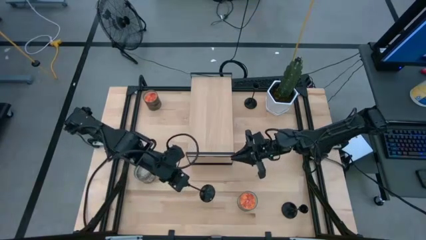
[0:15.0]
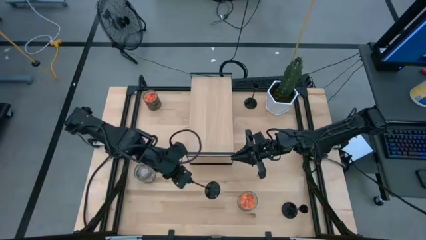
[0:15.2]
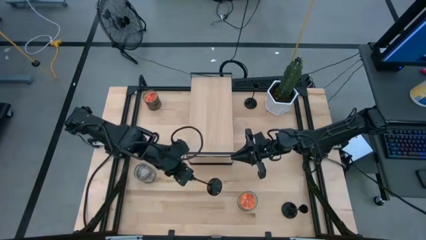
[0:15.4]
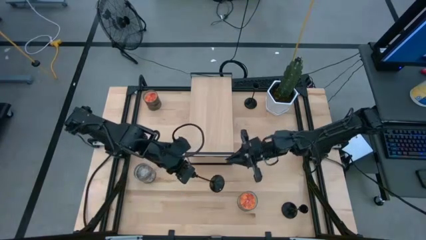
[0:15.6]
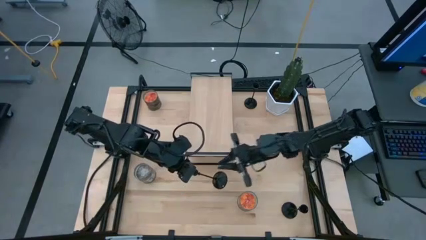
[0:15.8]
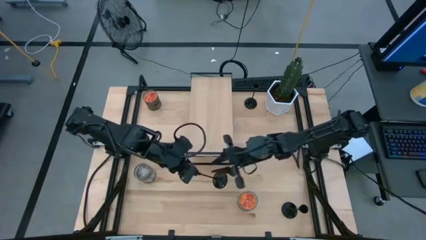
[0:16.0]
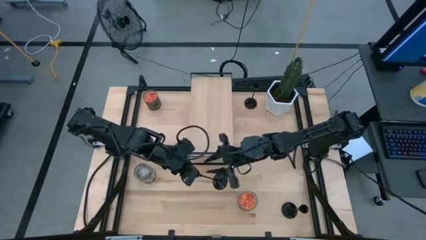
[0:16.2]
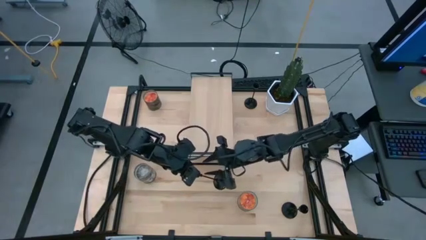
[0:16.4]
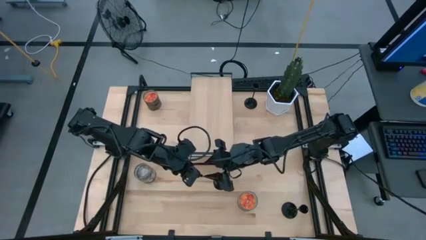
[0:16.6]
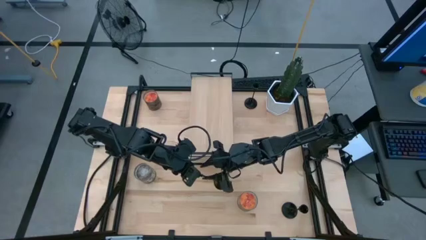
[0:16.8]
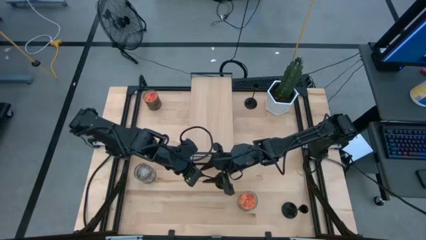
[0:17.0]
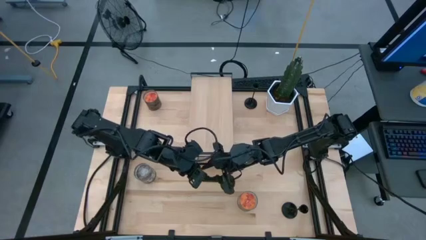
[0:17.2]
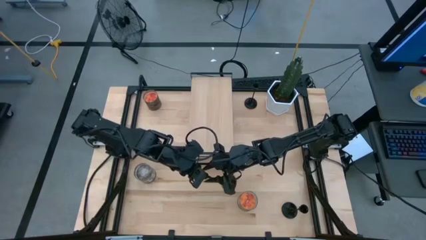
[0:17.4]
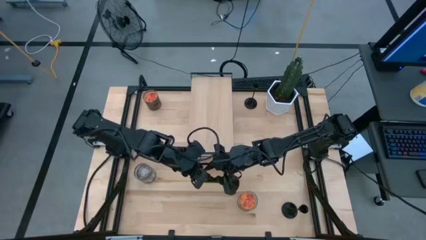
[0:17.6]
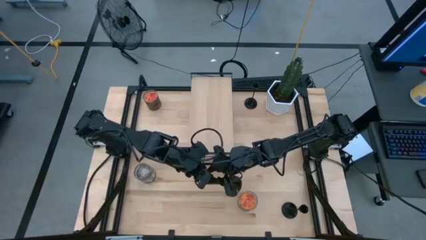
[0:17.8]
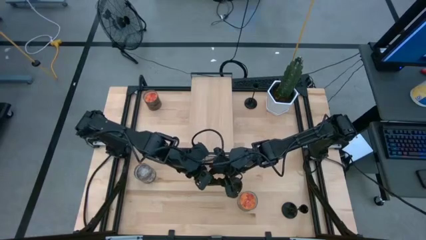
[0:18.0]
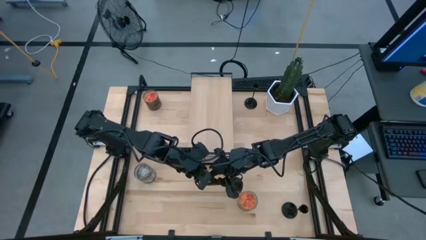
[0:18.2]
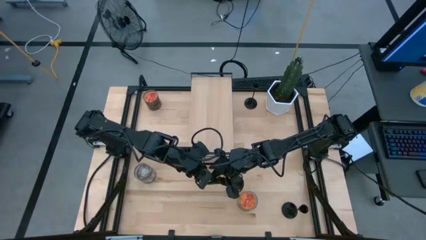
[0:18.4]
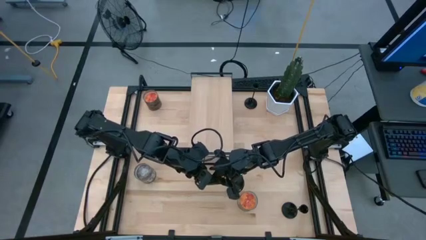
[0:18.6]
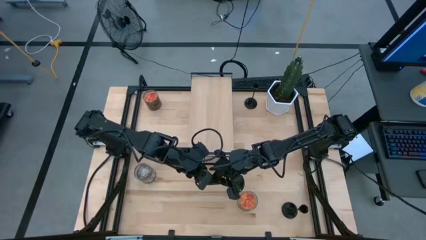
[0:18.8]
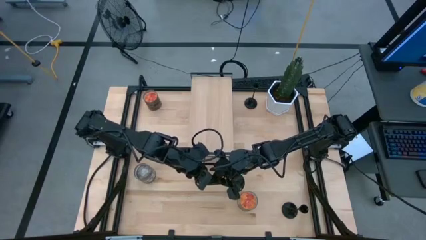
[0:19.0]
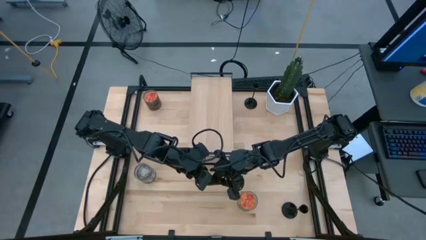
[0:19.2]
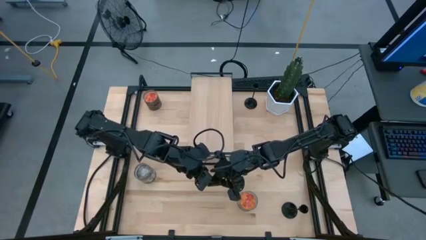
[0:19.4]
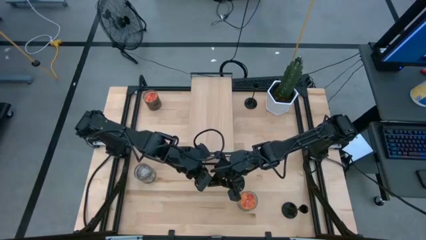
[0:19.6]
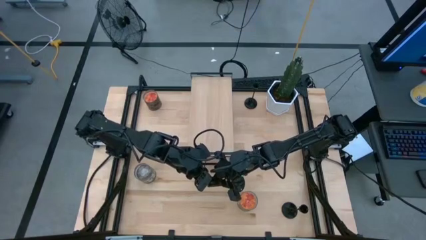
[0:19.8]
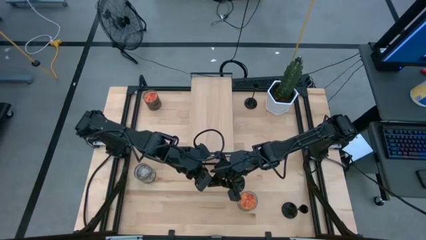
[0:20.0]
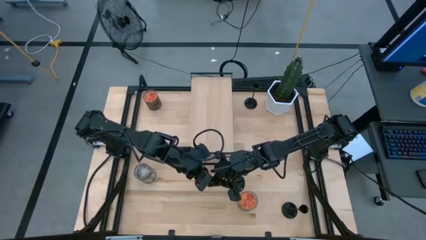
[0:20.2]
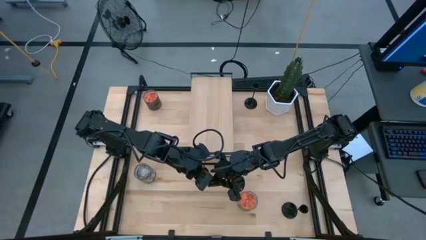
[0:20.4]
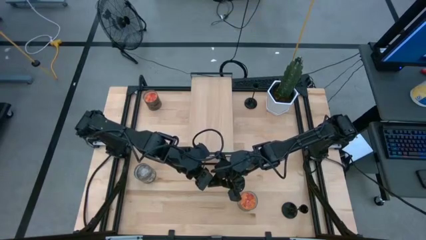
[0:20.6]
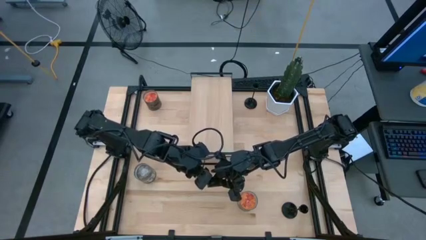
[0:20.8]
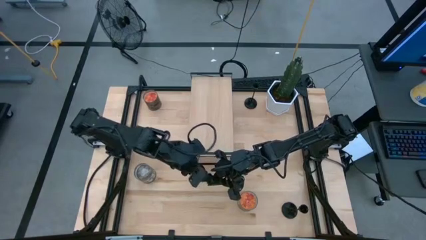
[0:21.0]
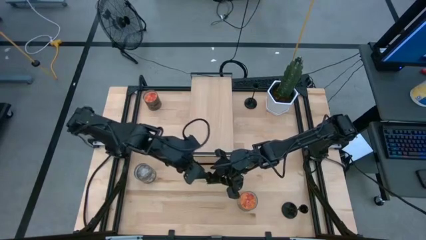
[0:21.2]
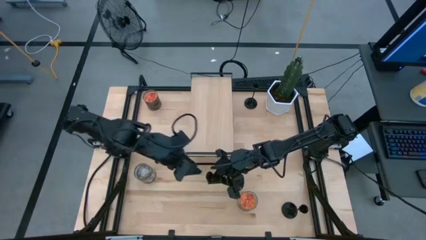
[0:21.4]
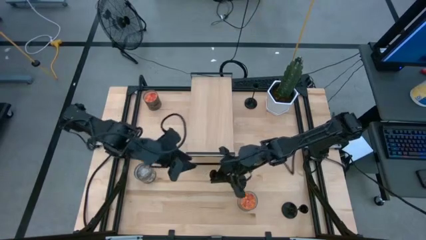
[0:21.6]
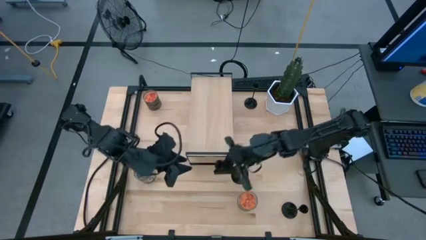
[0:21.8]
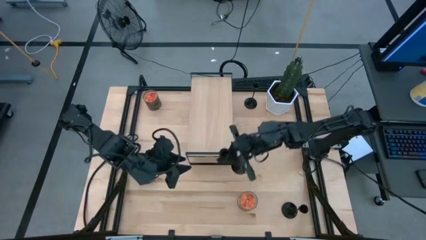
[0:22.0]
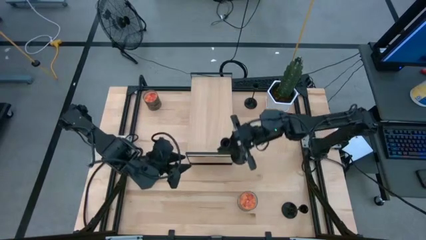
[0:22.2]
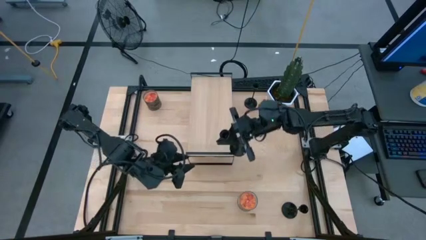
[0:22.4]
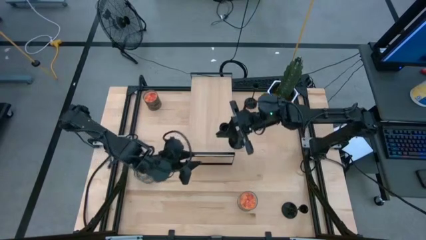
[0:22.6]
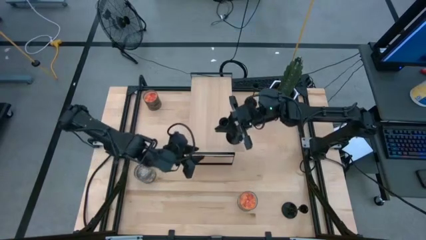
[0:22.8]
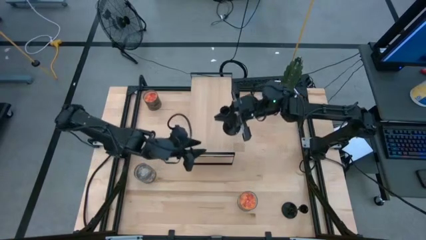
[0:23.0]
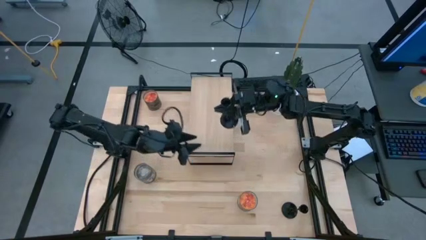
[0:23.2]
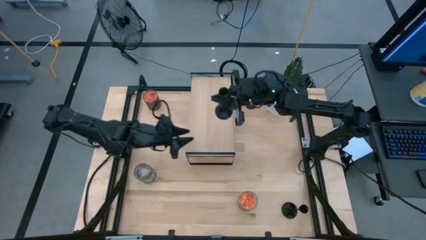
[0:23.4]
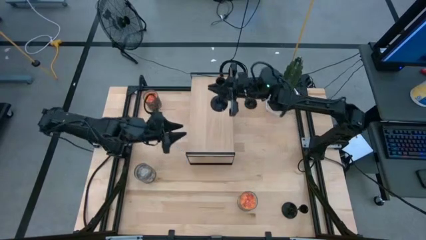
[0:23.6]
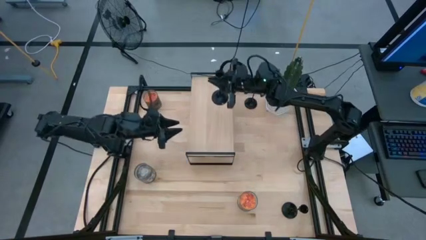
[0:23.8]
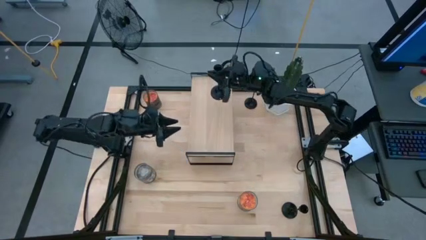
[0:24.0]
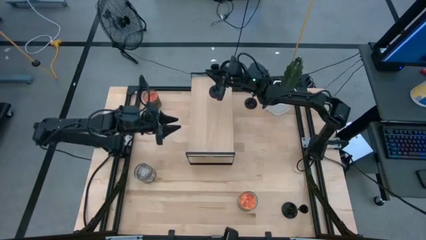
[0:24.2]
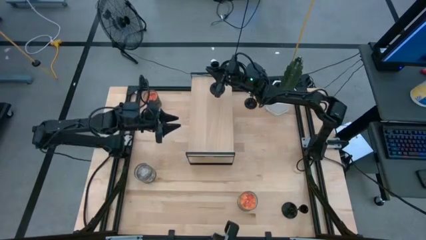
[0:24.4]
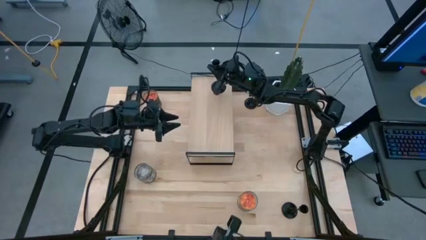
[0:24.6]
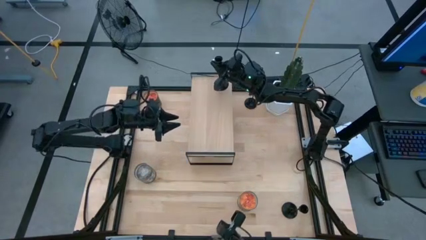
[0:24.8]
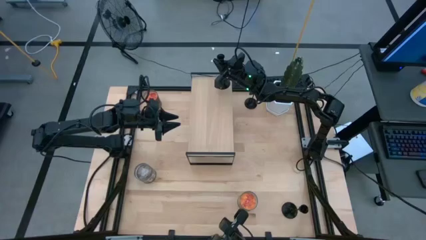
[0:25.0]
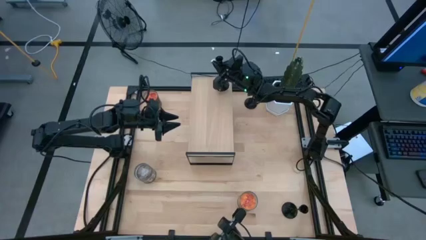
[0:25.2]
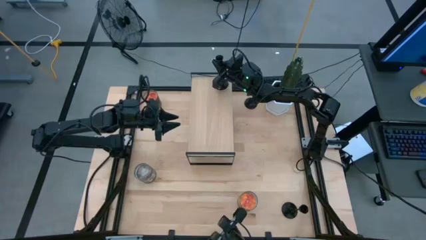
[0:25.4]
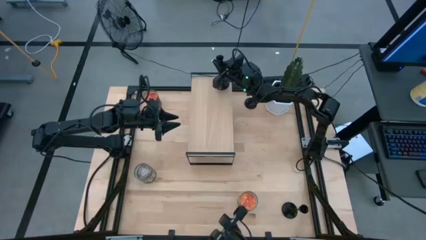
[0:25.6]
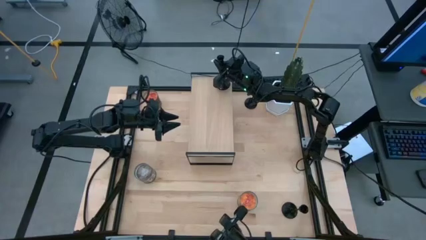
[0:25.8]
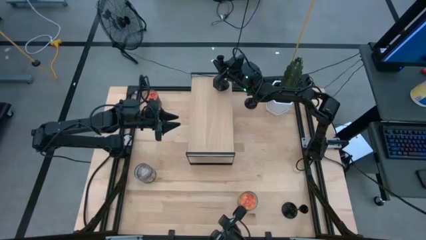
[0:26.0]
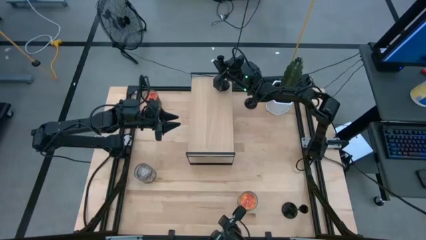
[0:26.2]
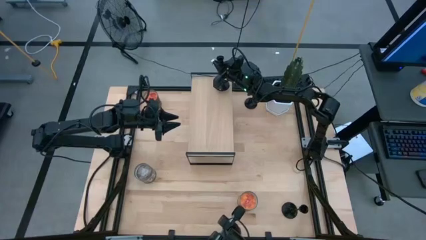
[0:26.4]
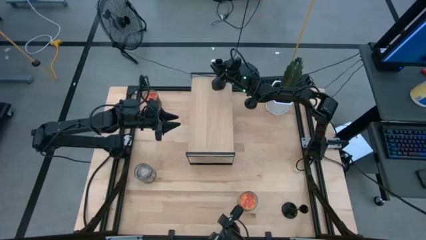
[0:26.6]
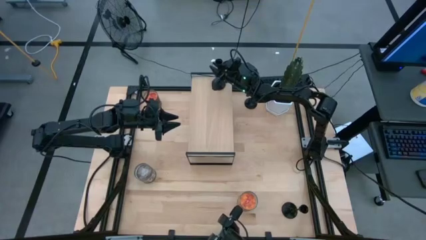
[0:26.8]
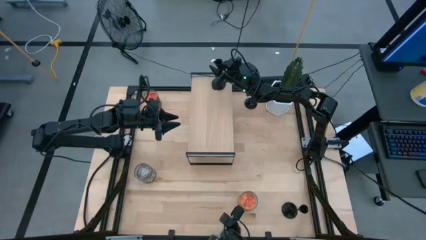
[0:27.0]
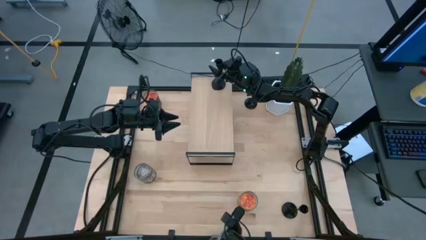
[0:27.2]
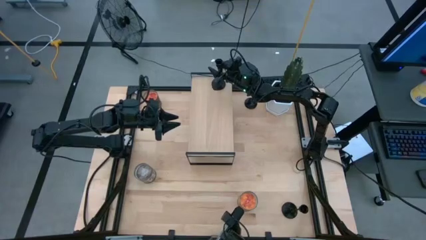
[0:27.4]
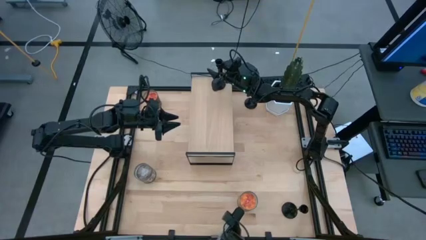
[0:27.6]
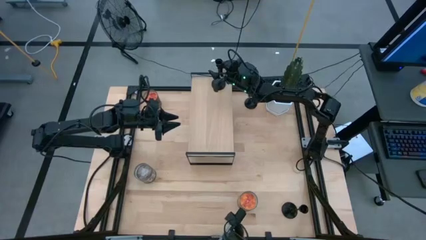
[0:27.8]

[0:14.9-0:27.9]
Task: Pick & Place candle stick holders
Put the bottom left black candle holder on the shelf

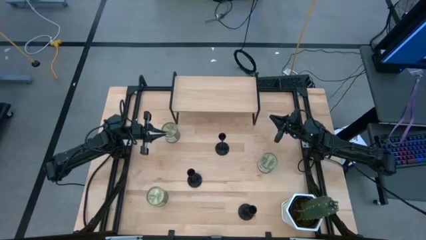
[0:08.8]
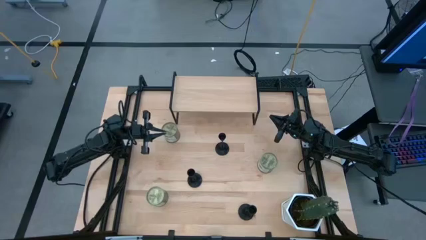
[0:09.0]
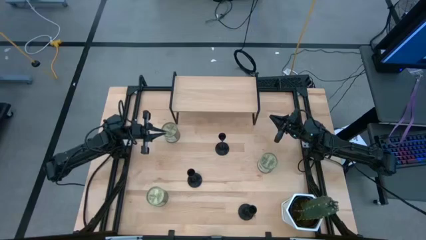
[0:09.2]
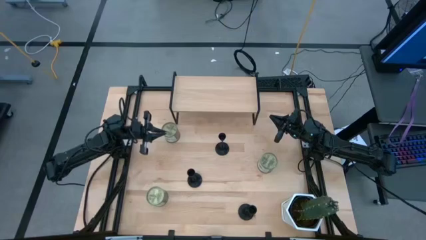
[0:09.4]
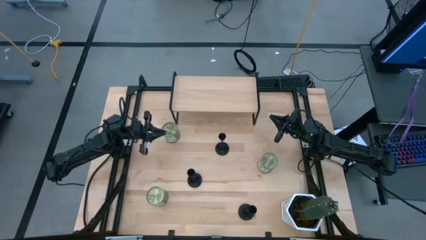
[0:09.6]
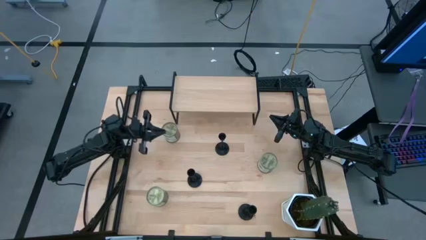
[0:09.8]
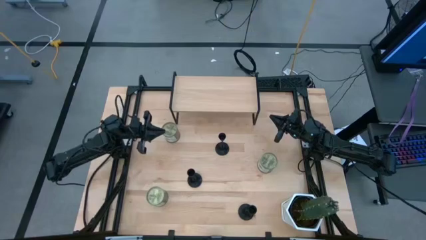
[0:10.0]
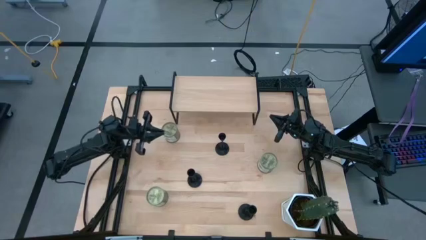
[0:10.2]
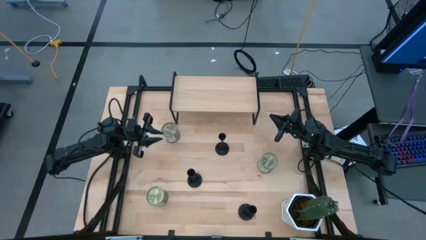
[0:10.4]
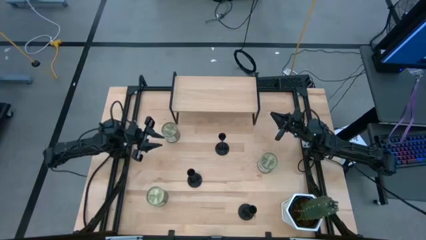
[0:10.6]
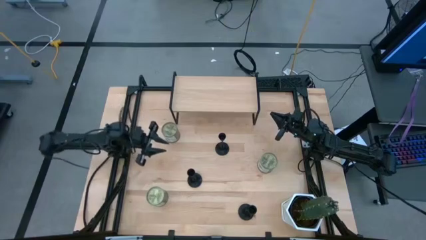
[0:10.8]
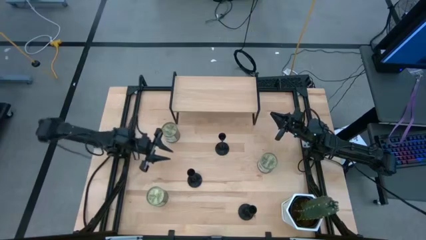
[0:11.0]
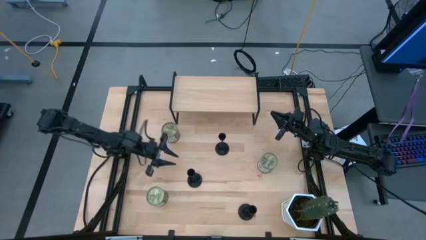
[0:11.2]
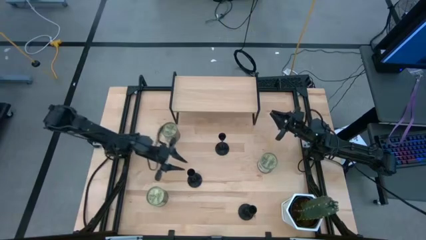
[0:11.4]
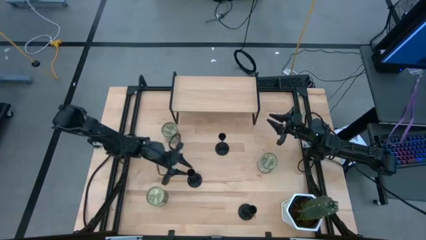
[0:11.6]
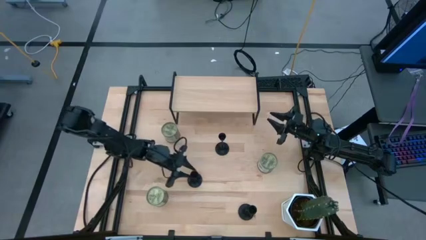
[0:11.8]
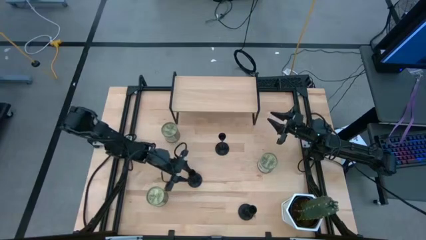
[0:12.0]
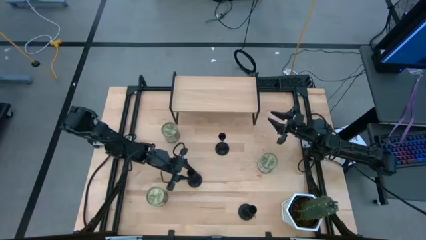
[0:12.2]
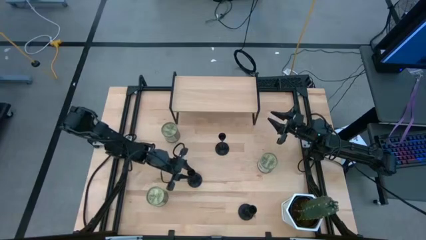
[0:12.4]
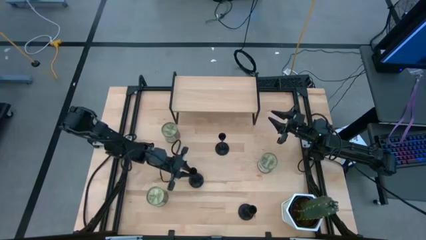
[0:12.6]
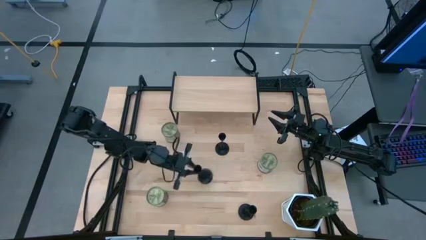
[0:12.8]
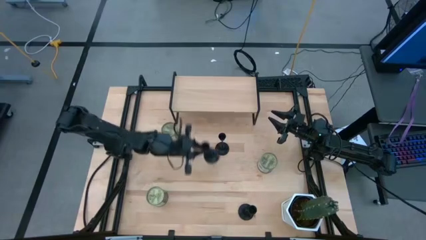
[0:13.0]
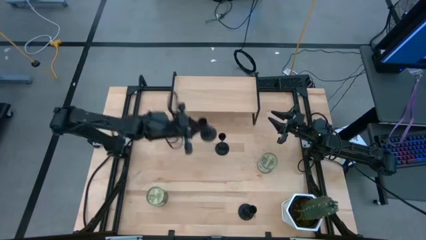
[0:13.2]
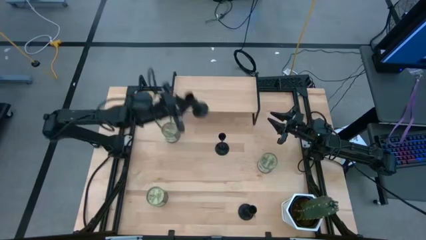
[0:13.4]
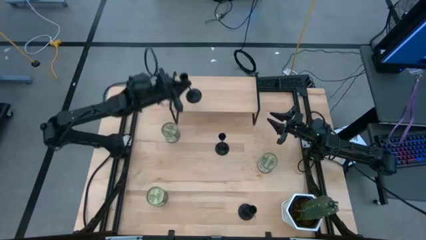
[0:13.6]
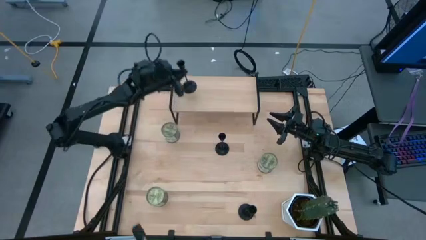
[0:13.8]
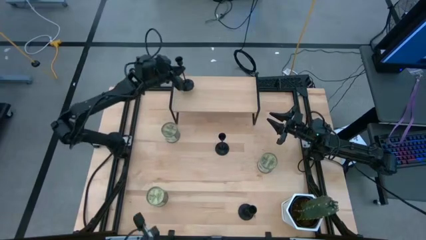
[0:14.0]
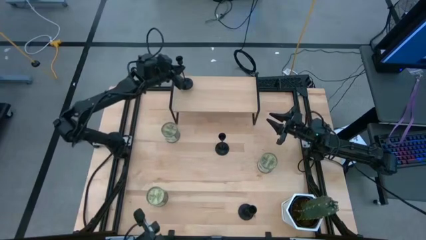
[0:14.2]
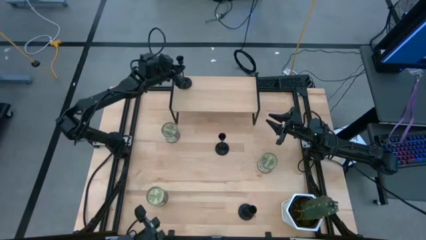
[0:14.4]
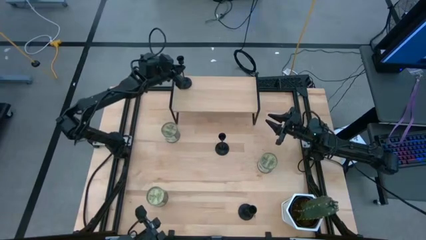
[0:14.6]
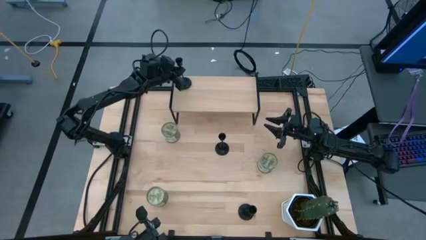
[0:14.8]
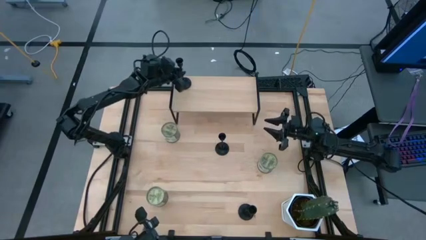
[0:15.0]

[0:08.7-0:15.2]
Task: Pick & Place candle stick holders
Put the middle black candle holder on the shelf
